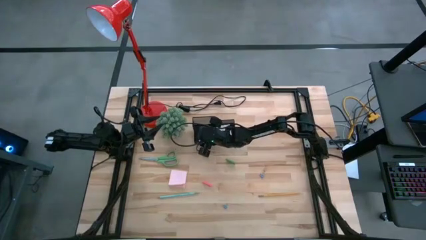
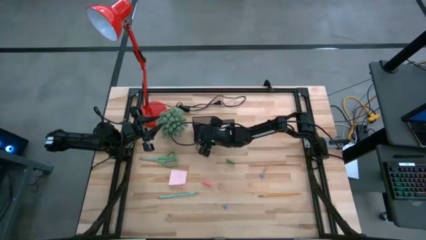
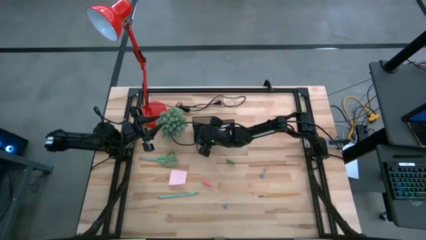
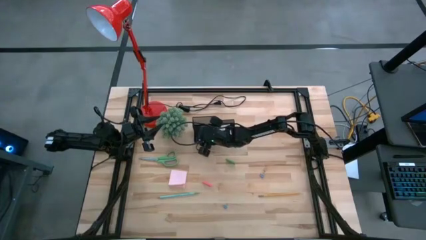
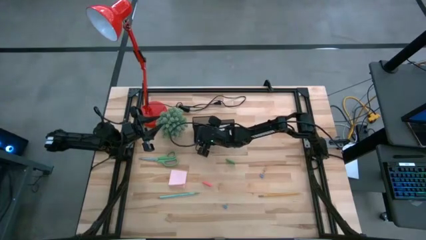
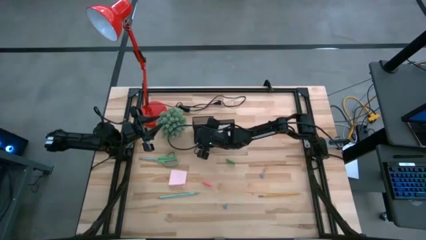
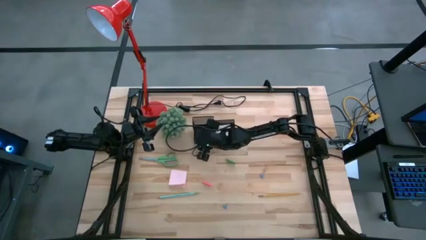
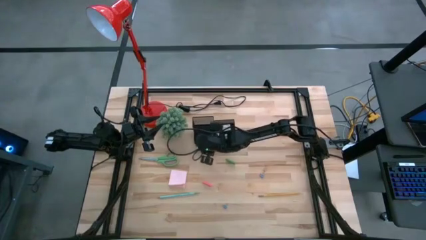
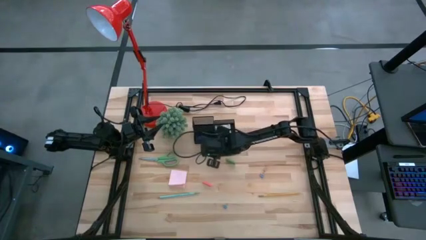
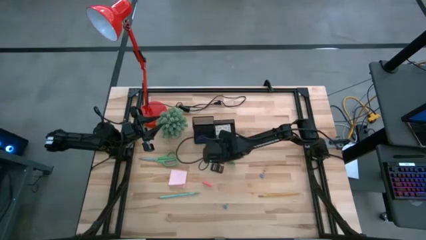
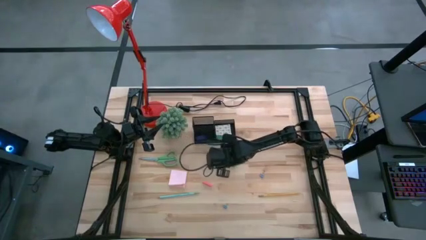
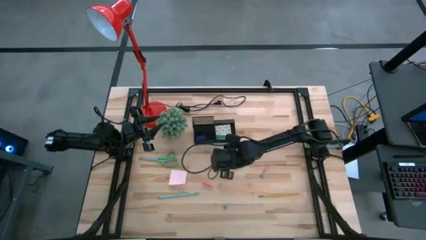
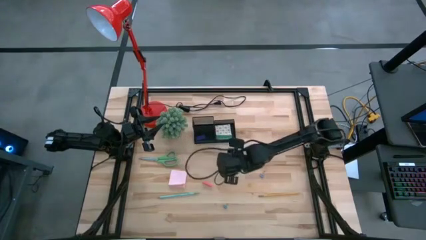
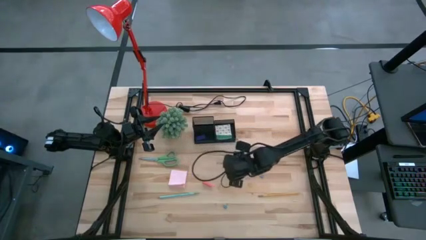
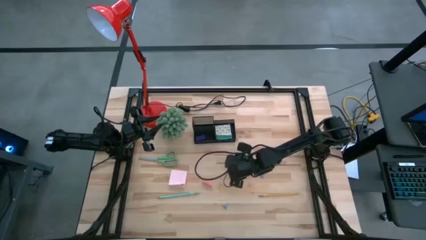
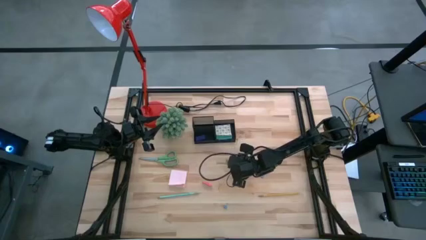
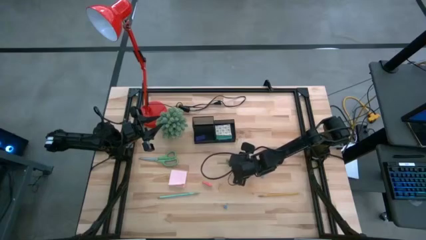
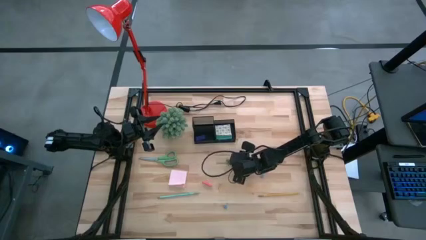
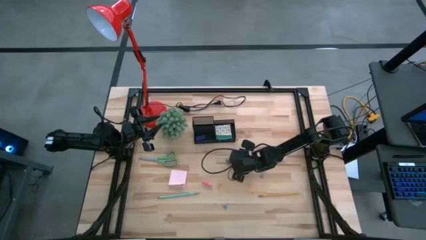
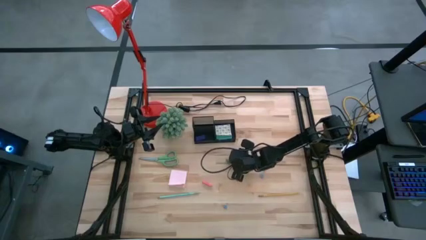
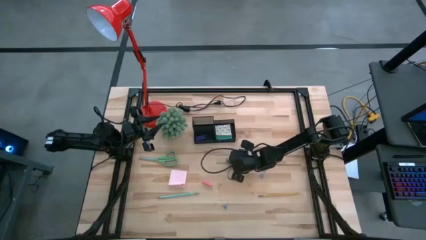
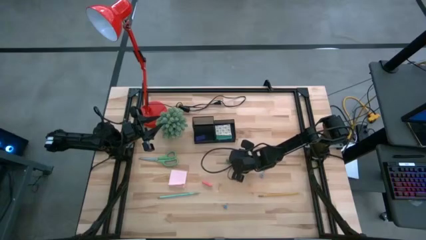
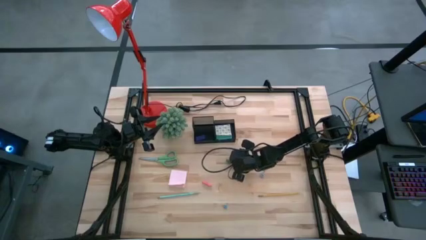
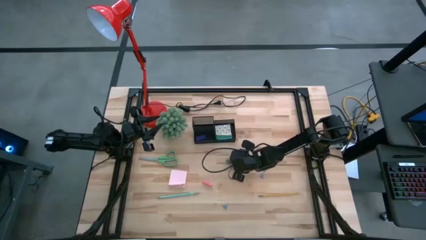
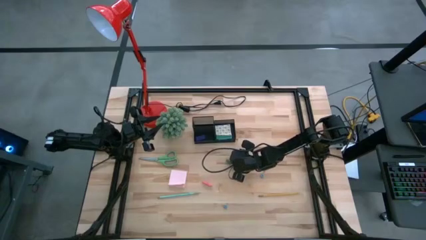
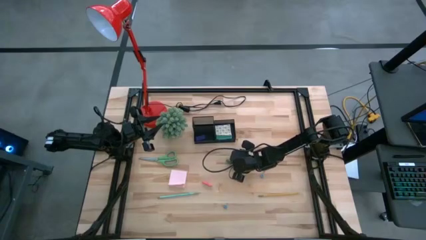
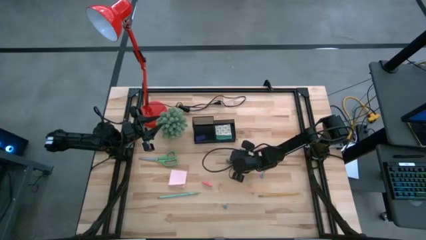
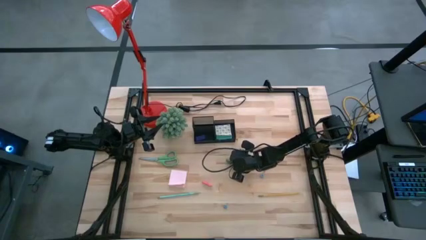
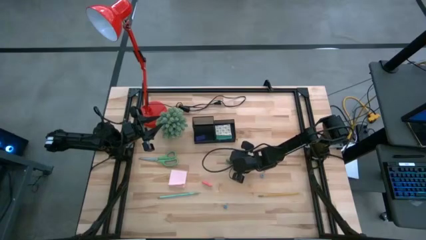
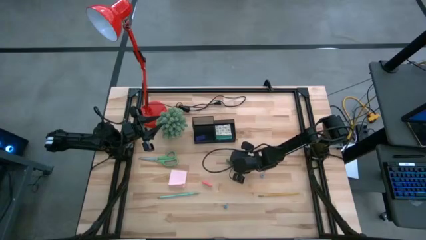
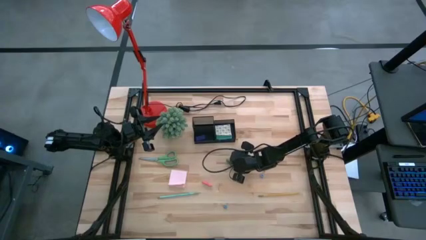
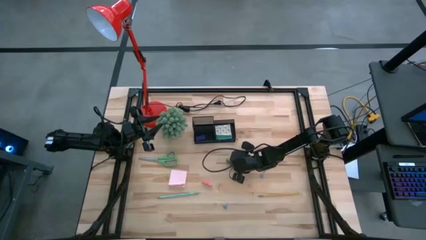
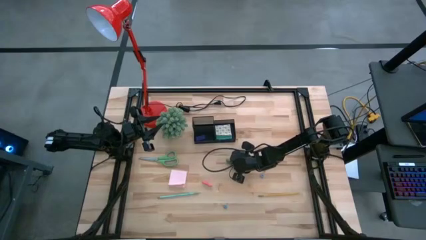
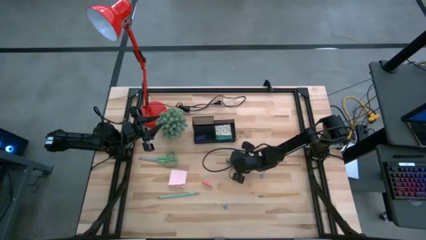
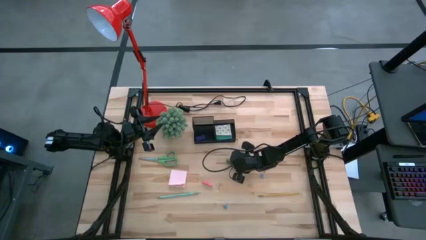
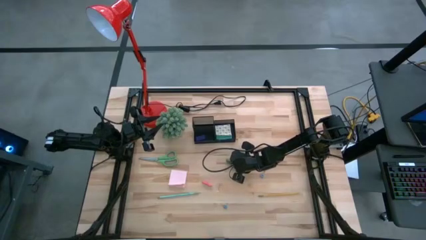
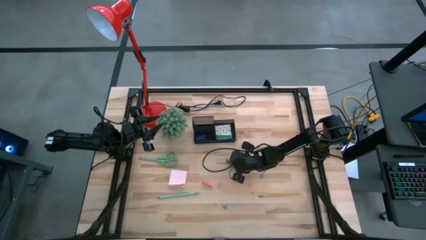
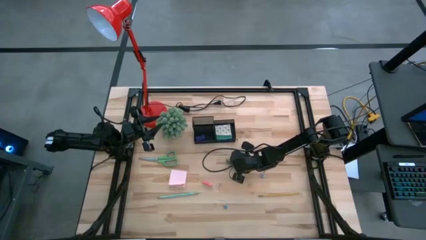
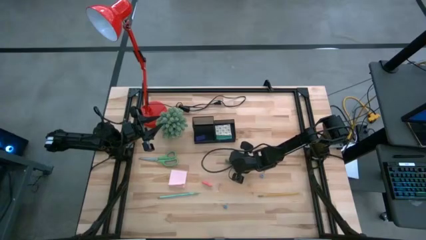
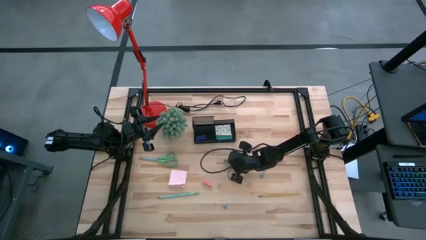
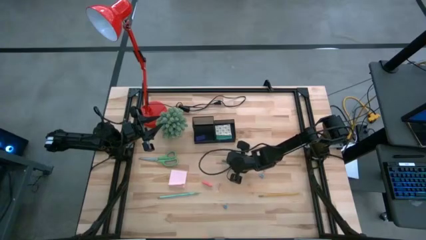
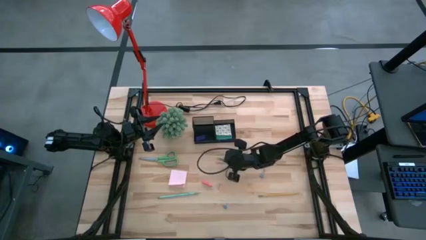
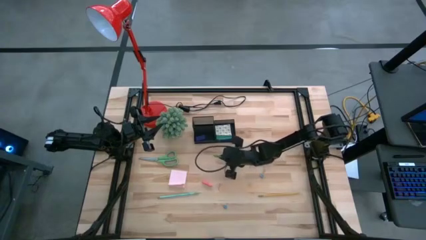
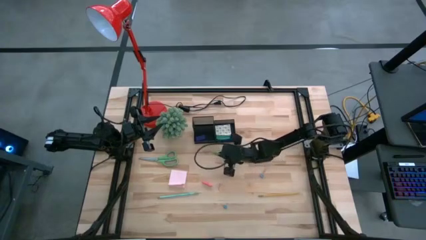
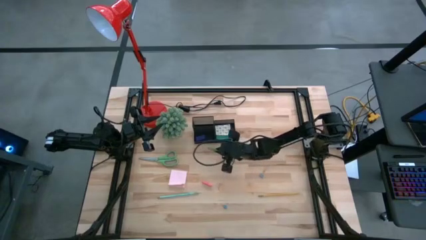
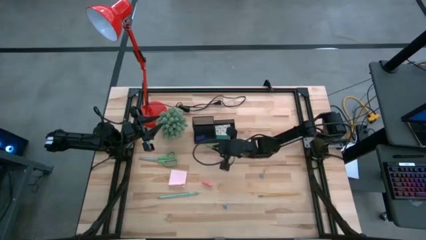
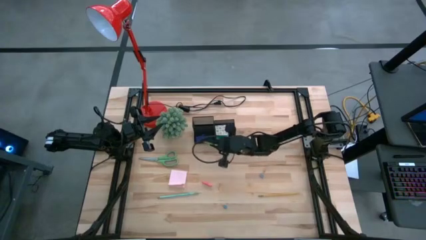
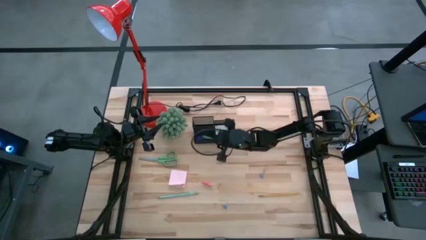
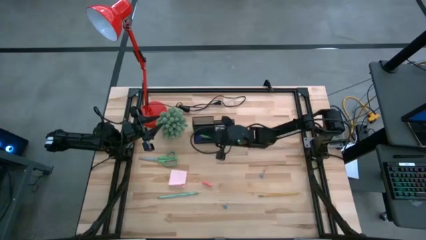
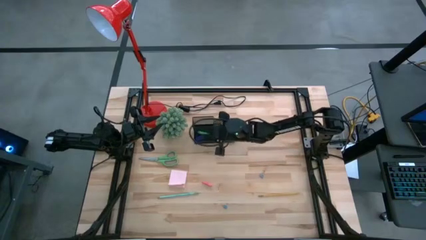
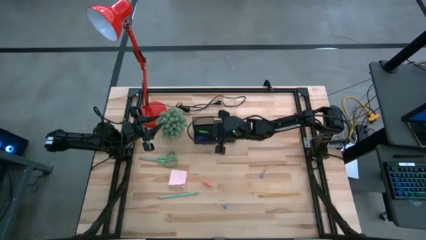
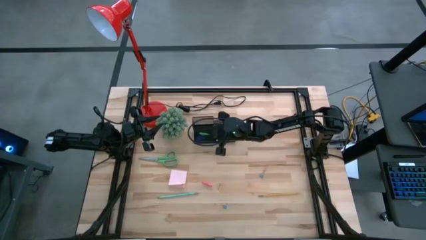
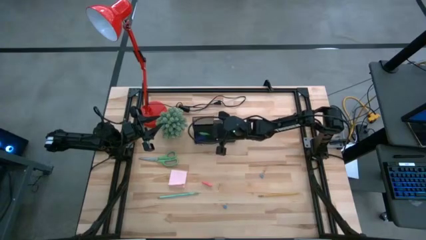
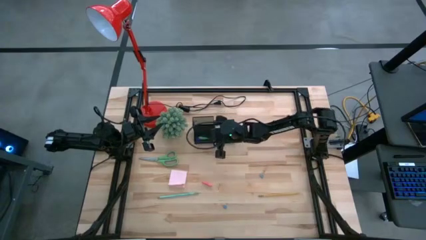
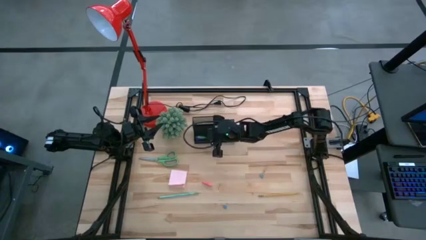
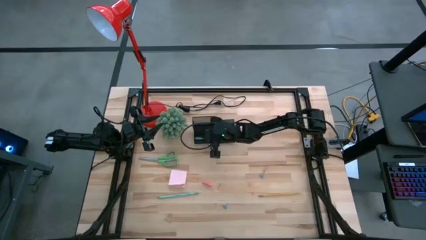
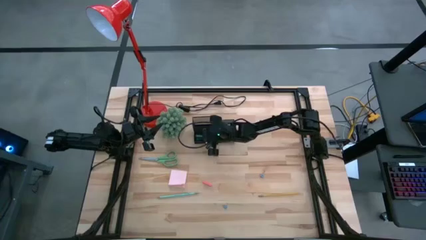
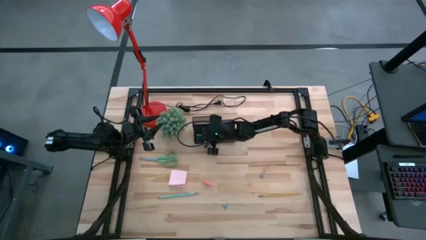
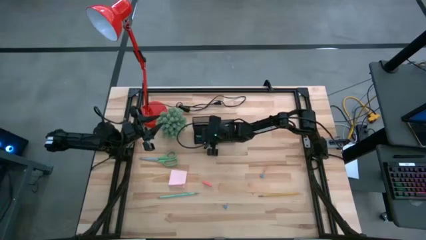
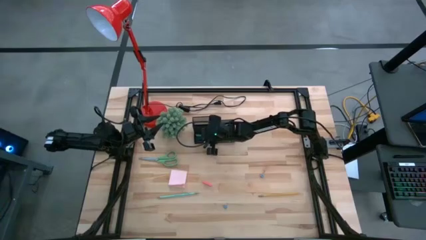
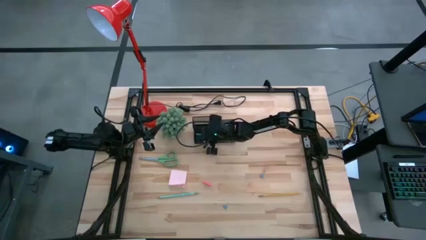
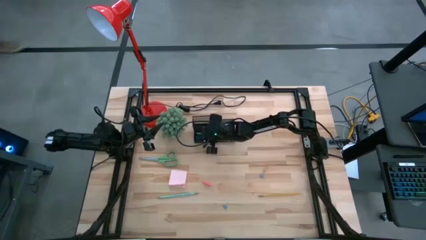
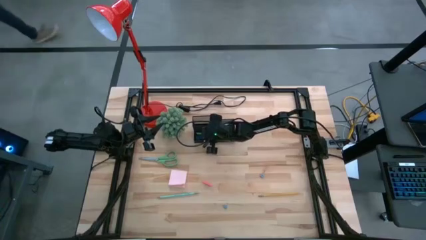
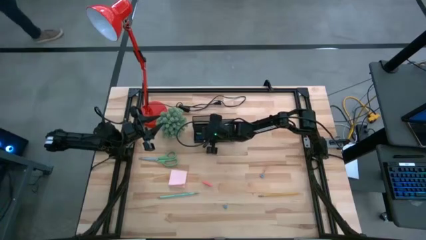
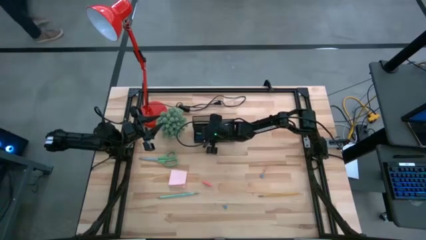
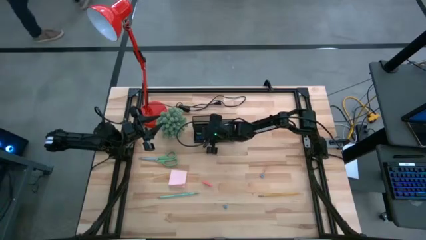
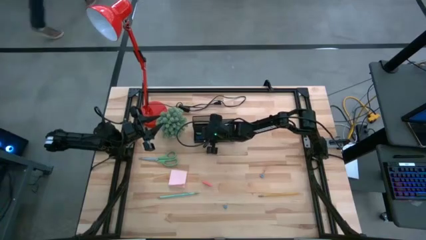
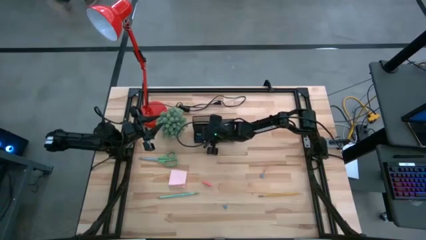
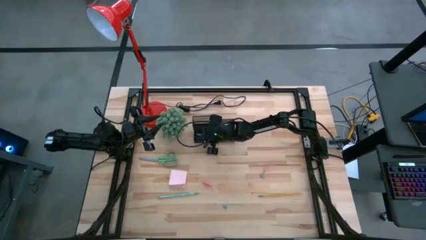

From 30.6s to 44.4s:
Task: Pick and place office supplies into organizer
Put the green eraser into the desk organizer

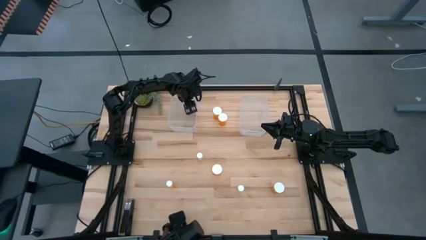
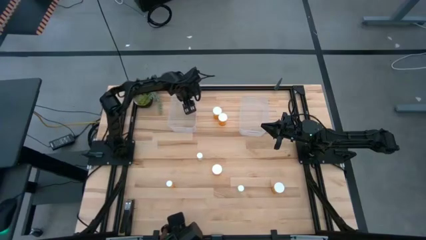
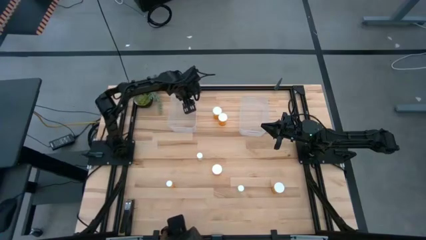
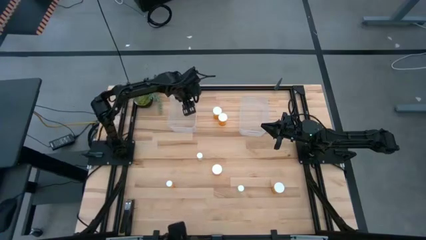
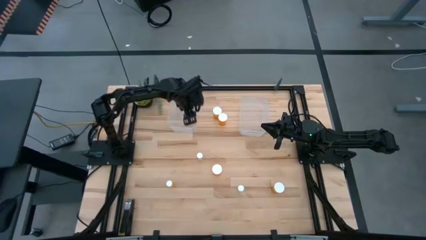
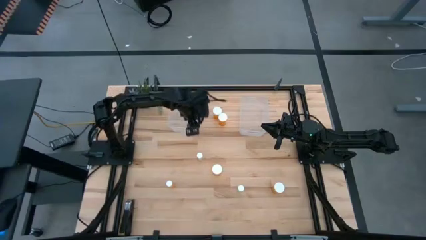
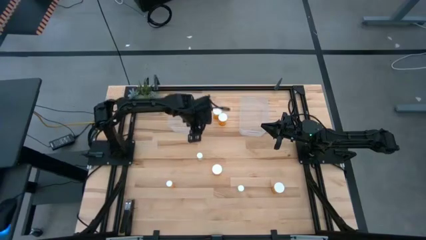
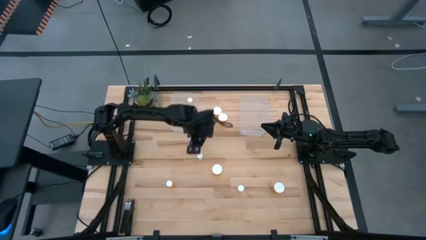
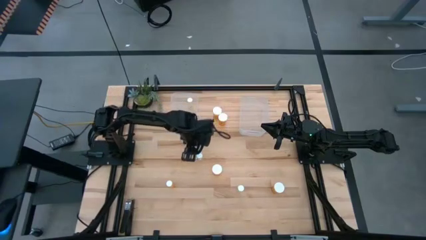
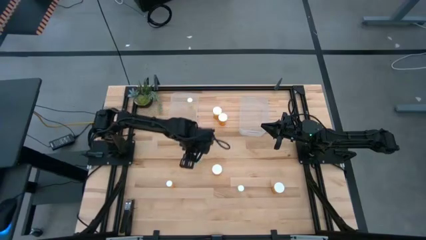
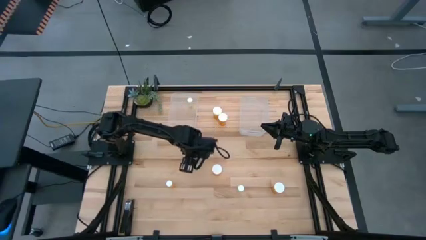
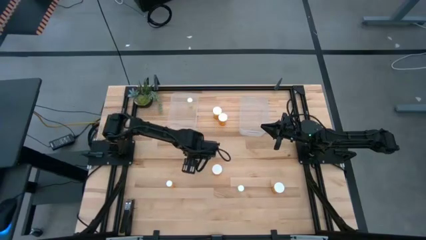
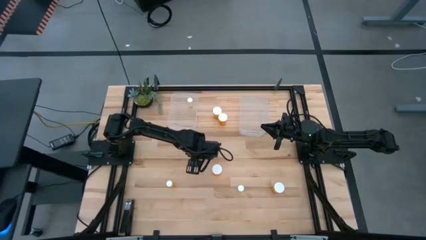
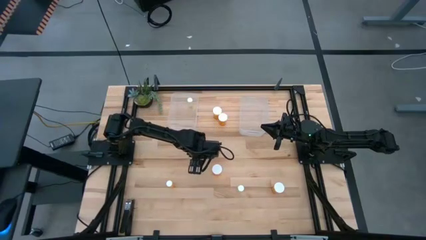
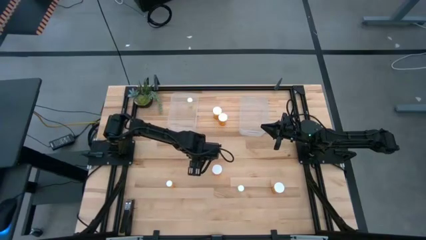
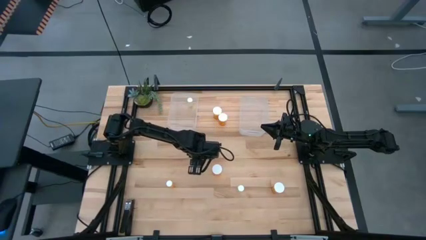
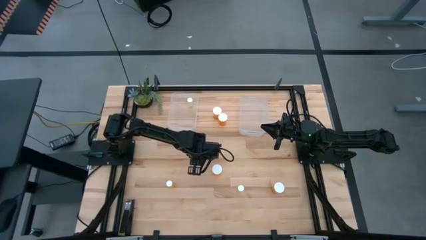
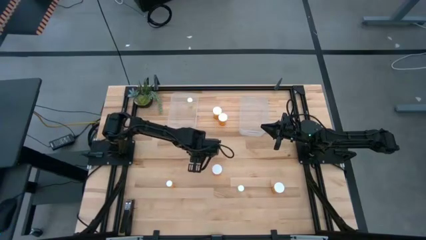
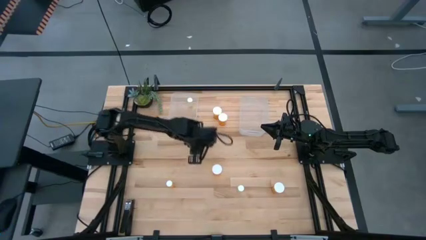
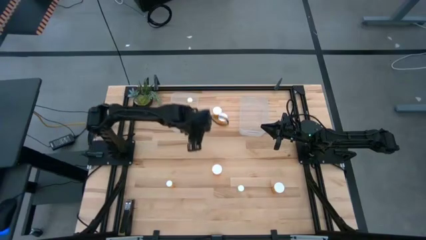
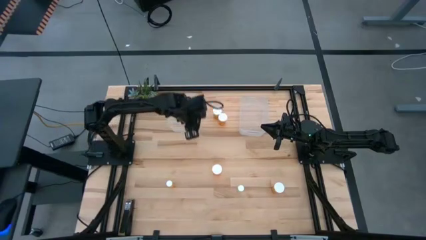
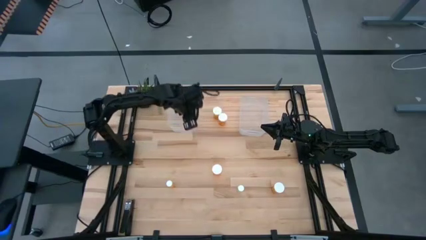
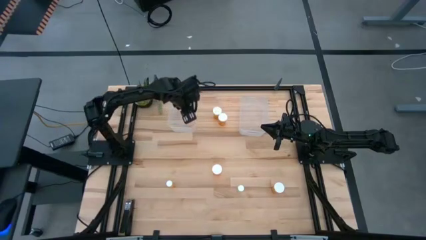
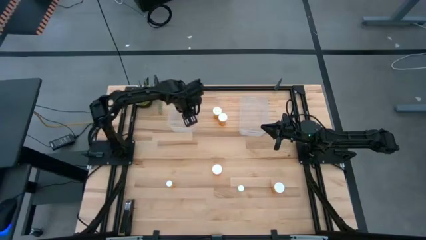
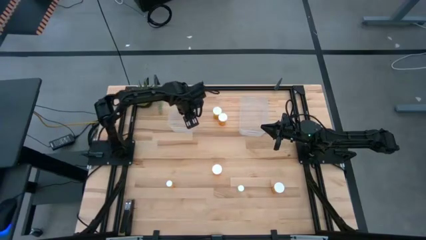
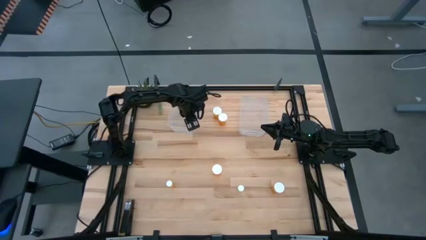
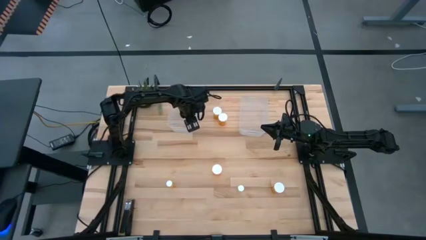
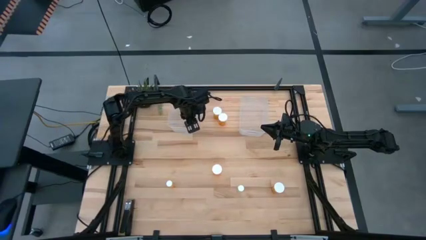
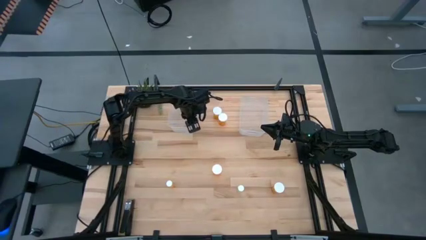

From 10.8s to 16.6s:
Task: Pick and place medicine bottles into bin by pill shape (circle, oval)
Put the top small yellow pill bottle into the left transparent bin
